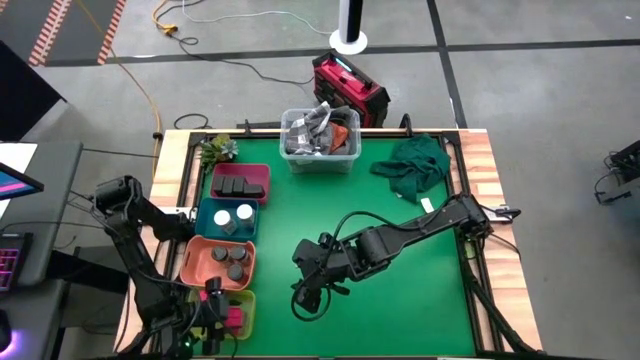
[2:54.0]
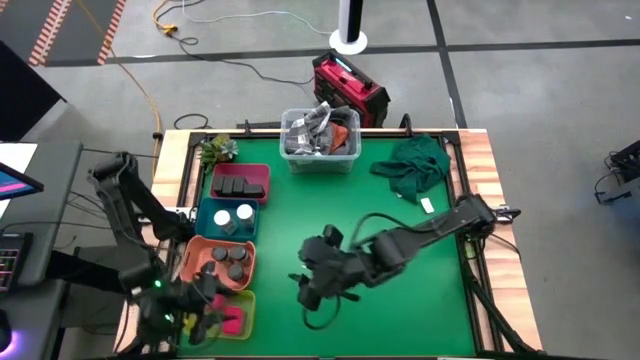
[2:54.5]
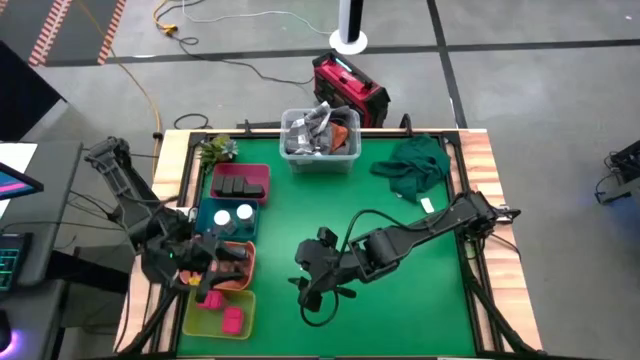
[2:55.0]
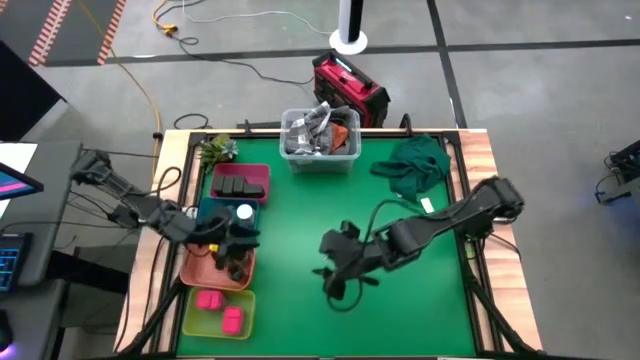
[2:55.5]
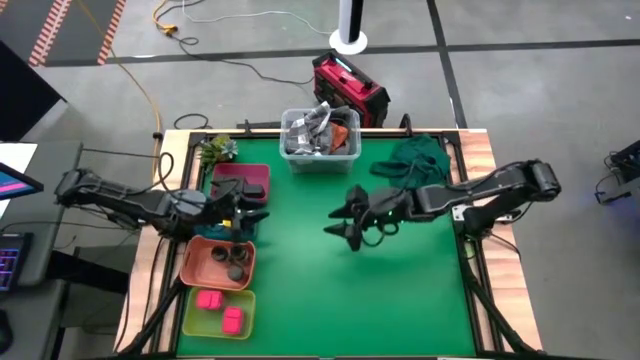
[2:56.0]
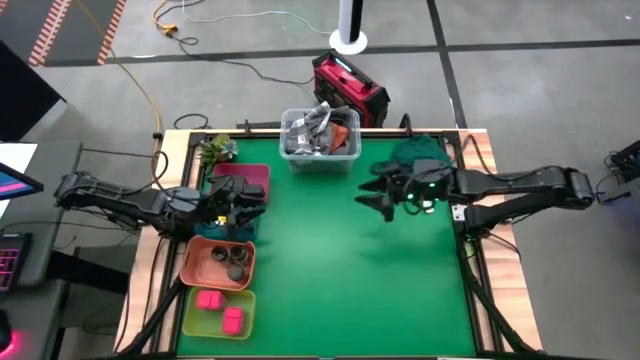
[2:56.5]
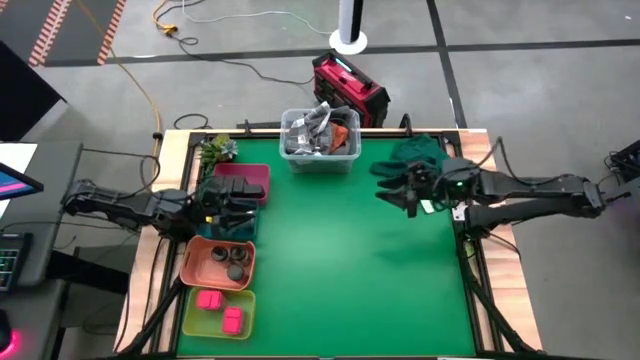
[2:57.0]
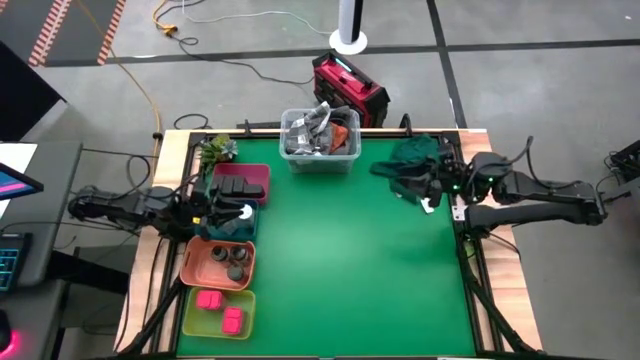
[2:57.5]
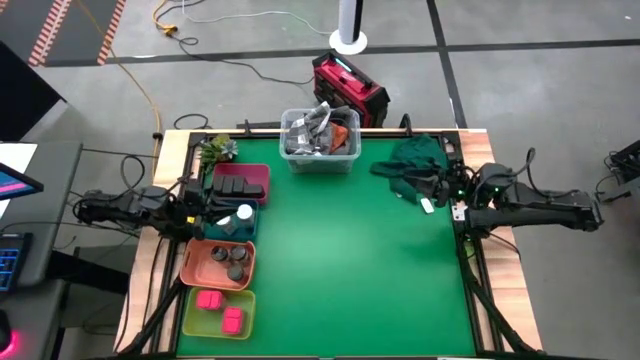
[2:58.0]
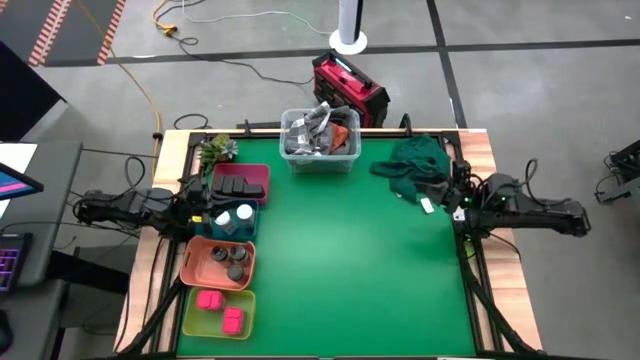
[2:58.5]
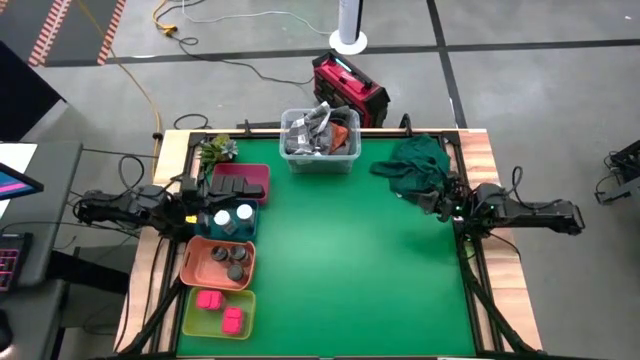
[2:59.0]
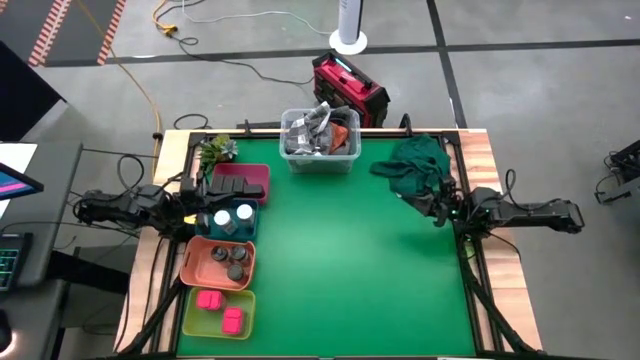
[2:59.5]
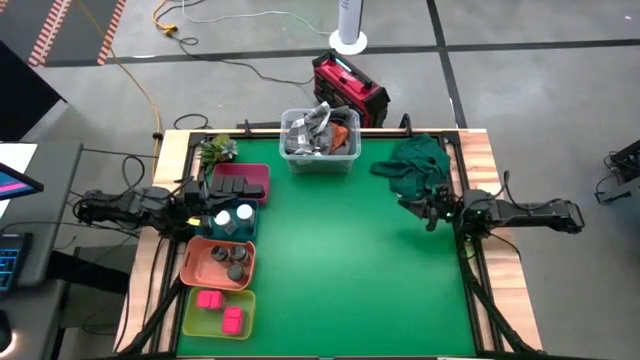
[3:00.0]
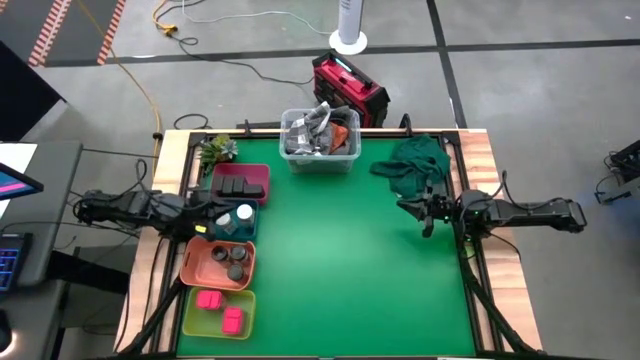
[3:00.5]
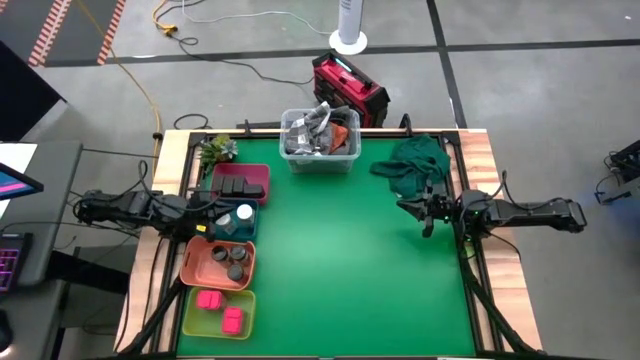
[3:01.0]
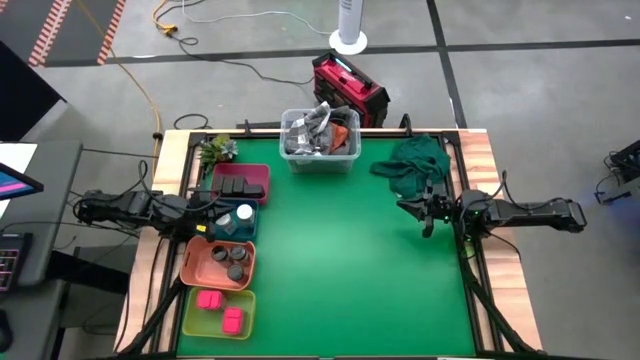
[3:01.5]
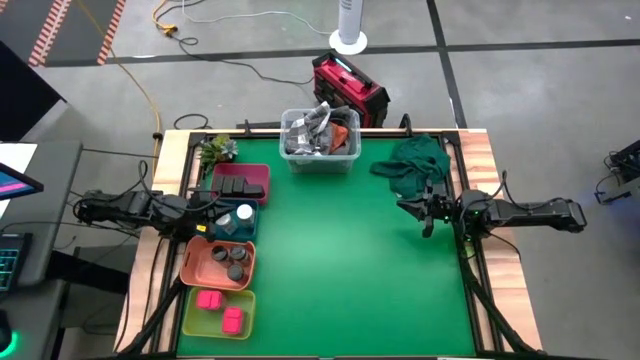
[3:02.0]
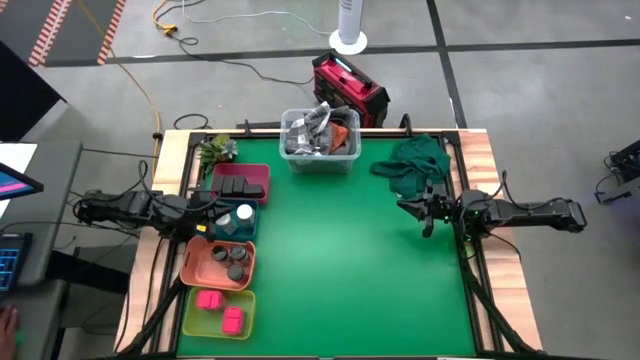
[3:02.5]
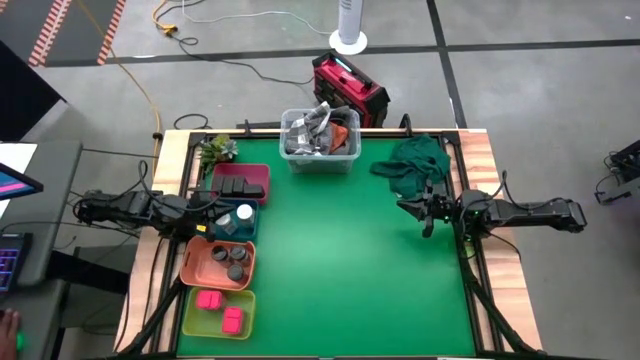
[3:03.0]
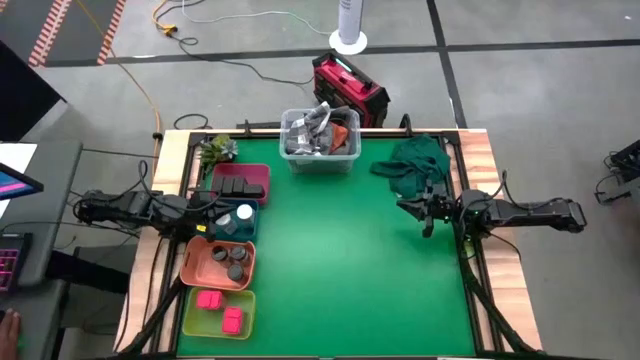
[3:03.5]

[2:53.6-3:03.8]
Task: Sort spices by type
Return to Home Position

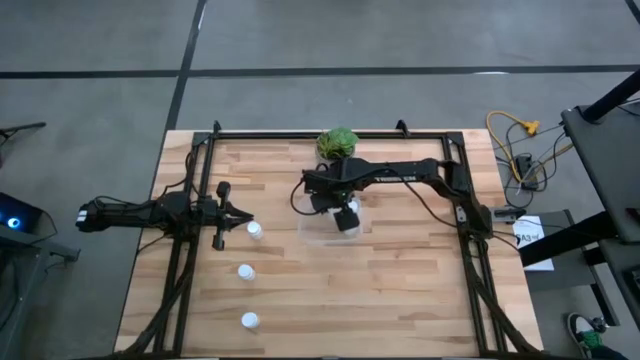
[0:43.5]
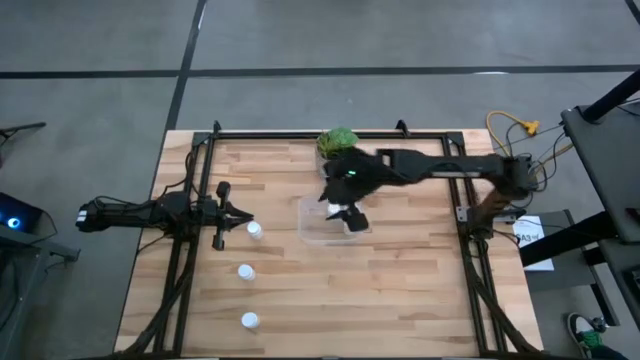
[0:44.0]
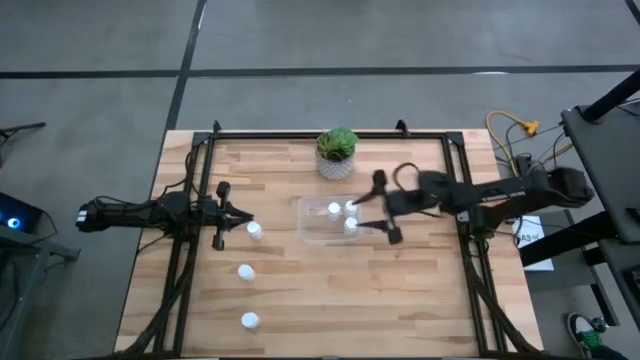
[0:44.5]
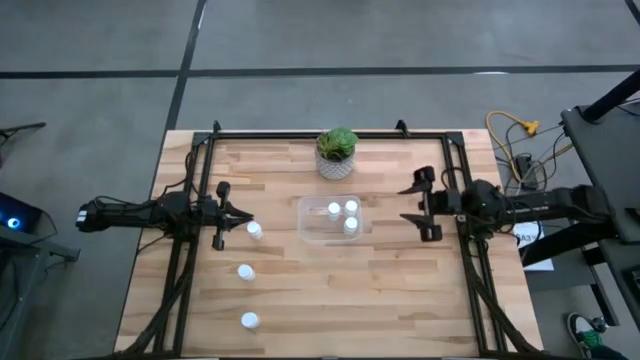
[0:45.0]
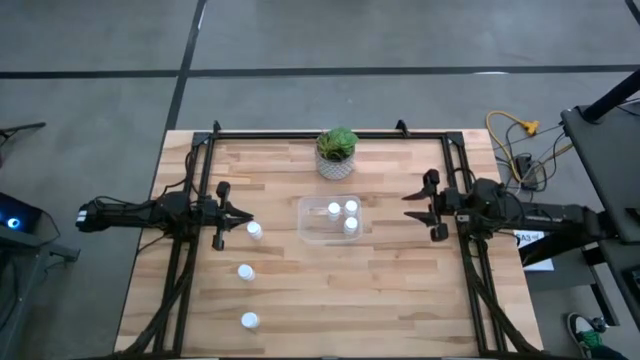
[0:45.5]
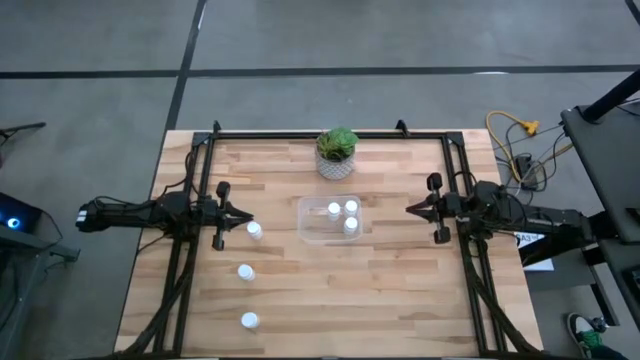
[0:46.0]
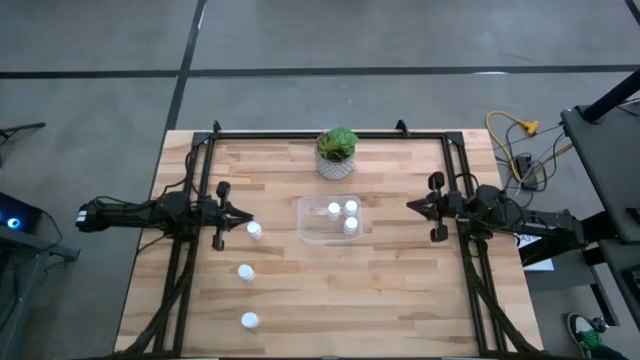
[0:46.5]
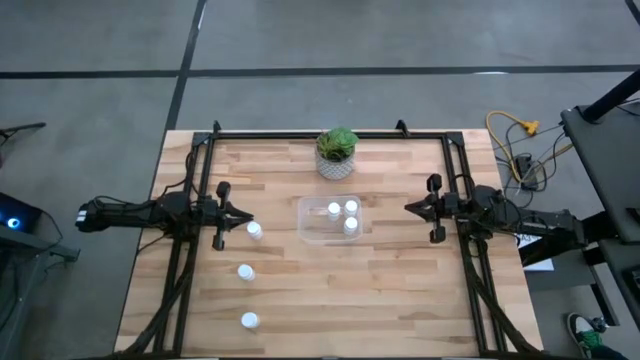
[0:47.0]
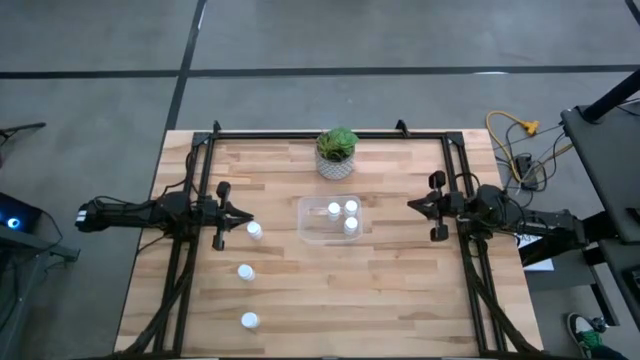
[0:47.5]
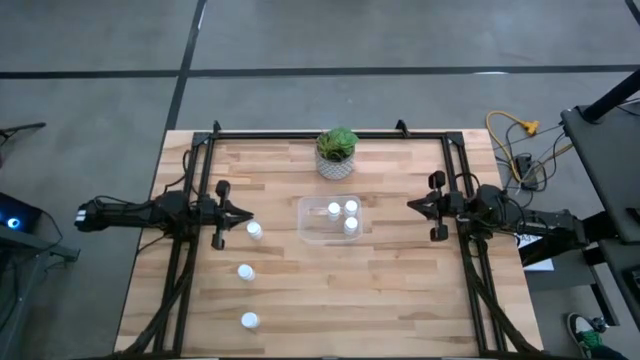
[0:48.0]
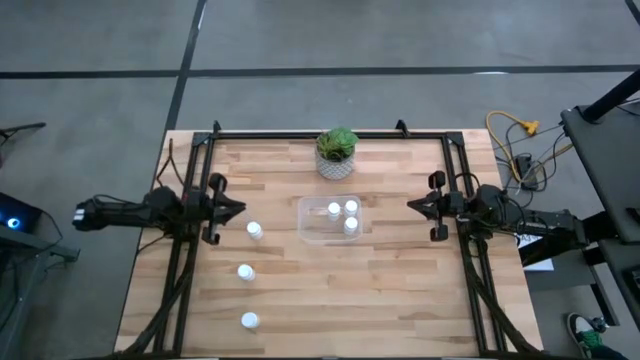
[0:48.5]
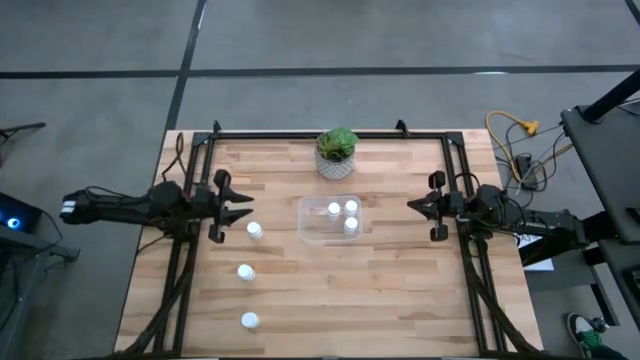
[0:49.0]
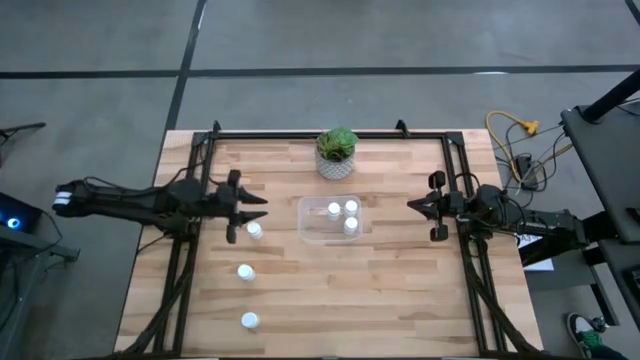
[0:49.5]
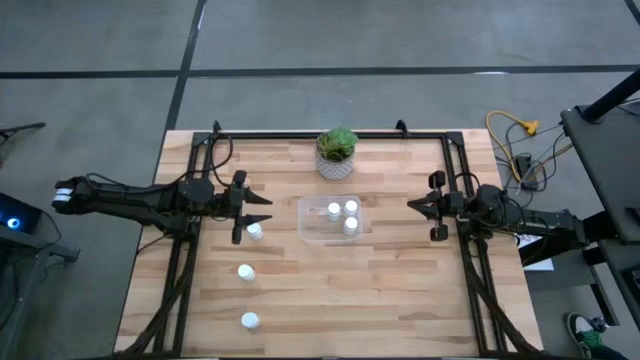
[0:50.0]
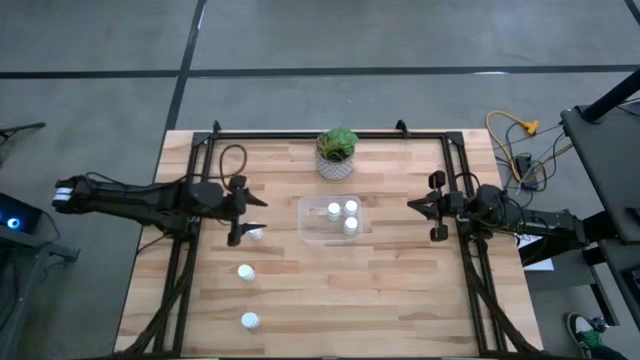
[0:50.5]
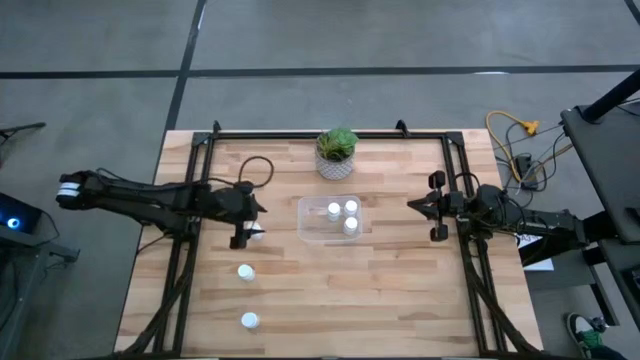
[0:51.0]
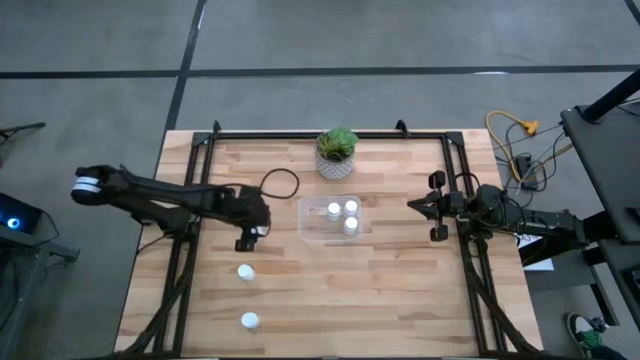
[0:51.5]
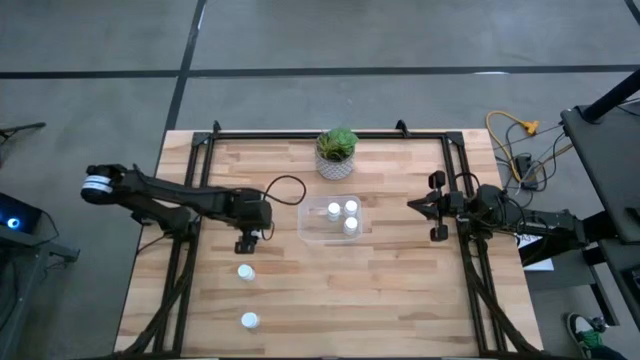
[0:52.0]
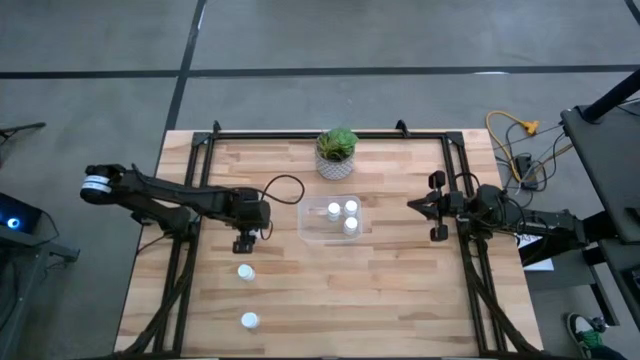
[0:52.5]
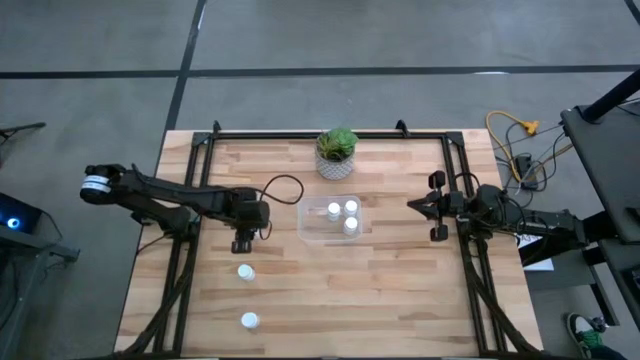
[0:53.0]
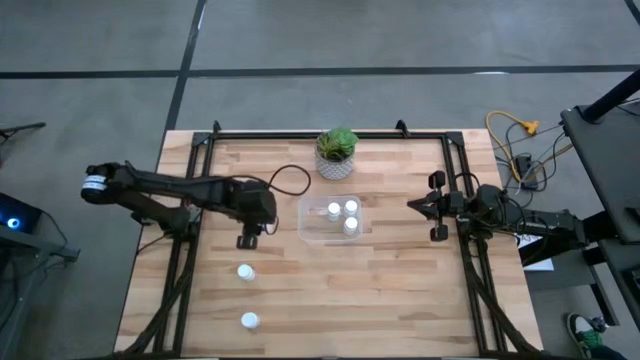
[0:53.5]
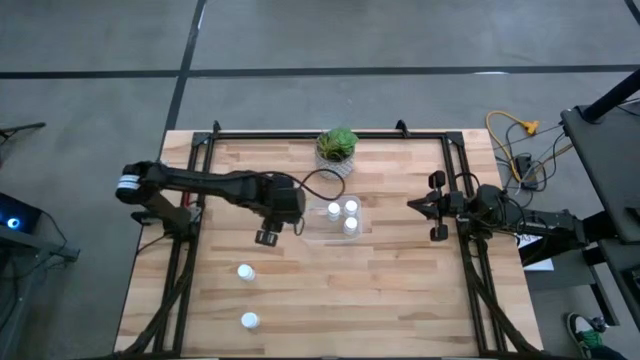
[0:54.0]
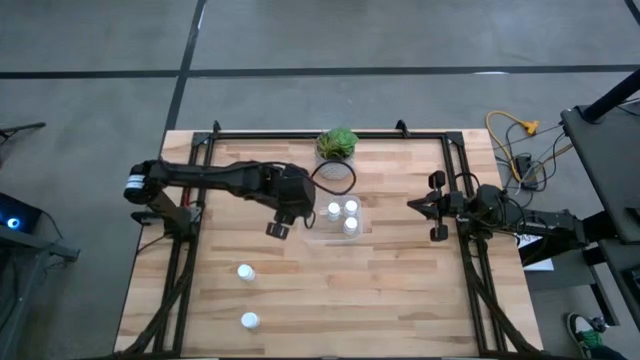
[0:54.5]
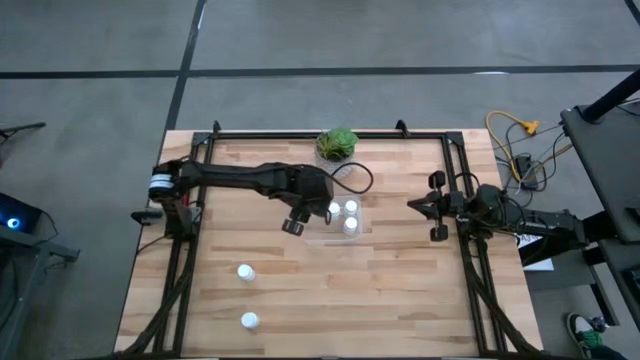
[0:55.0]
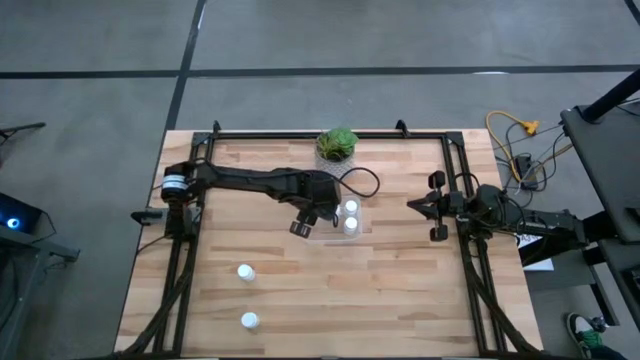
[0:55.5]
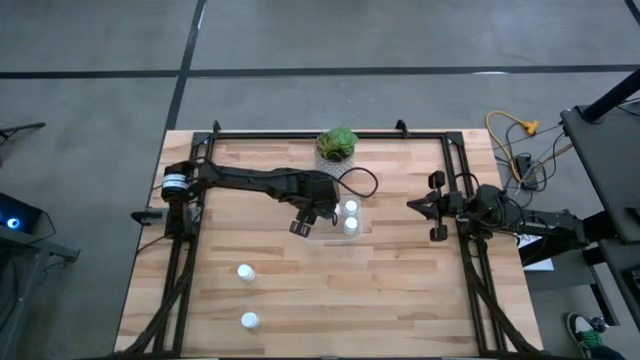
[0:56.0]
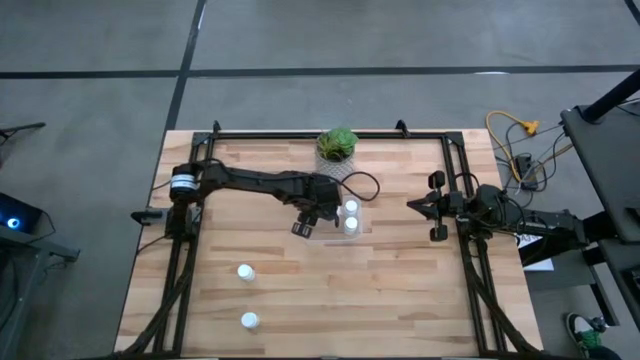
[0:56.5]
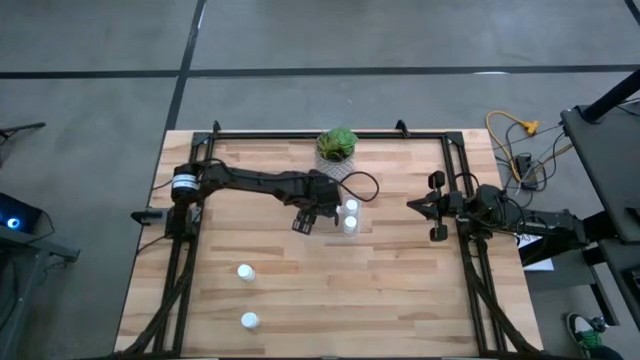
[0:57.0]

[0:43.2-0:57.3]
Task: Pick and place pill bottles into a basket
Put the white medicine bottle into the transparent bin
